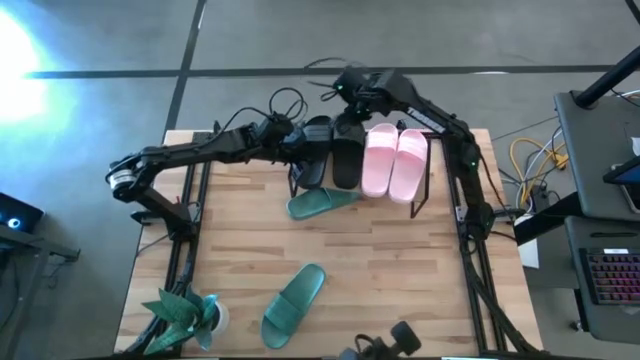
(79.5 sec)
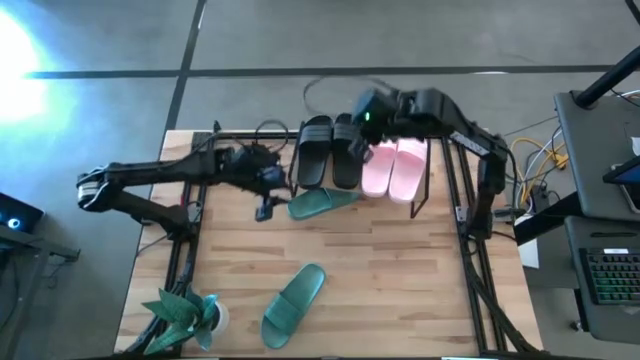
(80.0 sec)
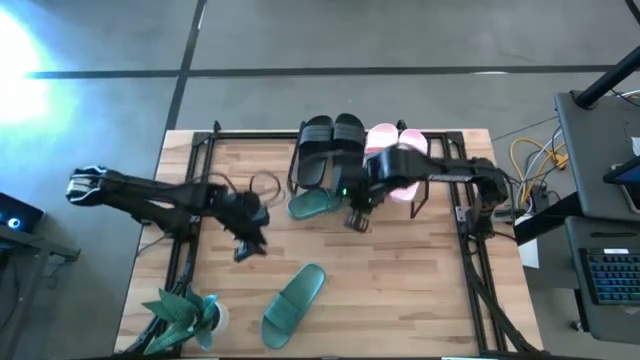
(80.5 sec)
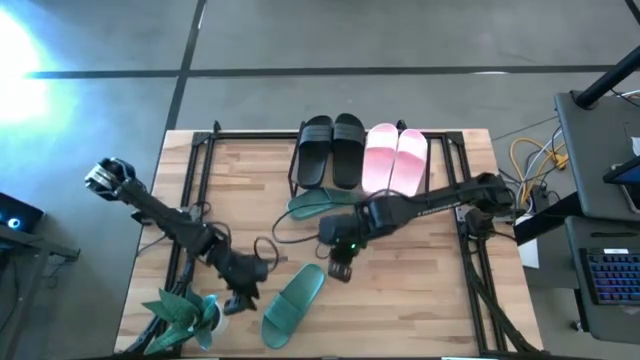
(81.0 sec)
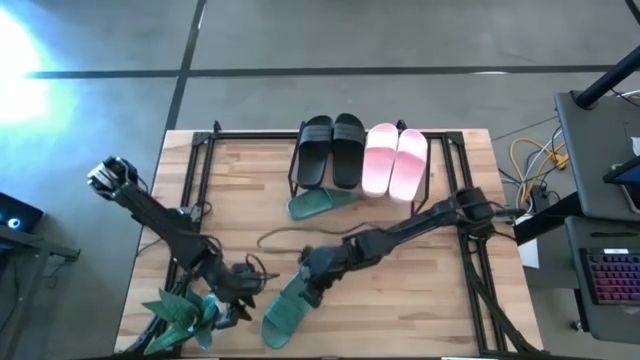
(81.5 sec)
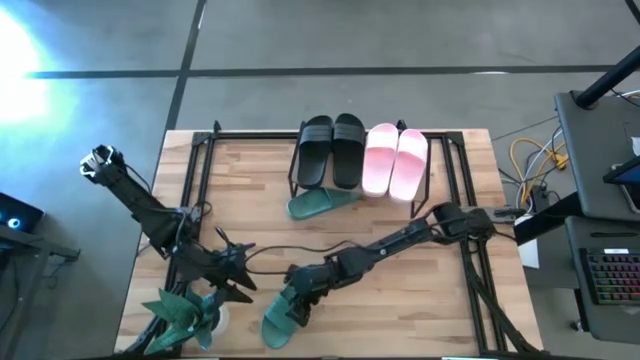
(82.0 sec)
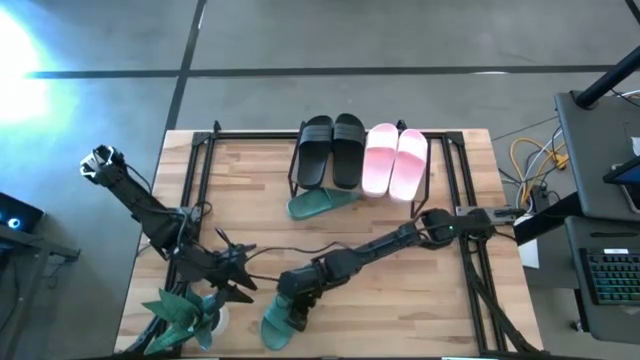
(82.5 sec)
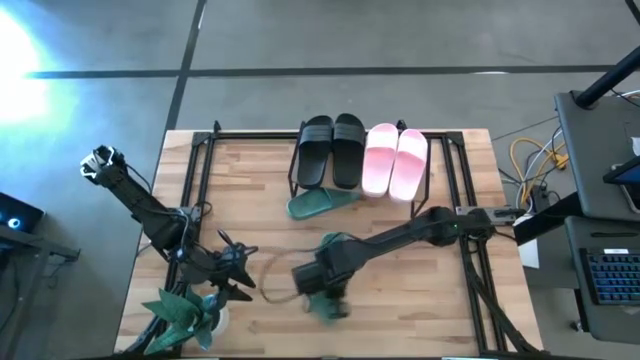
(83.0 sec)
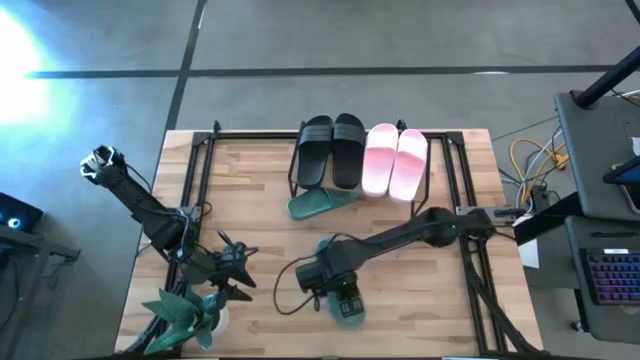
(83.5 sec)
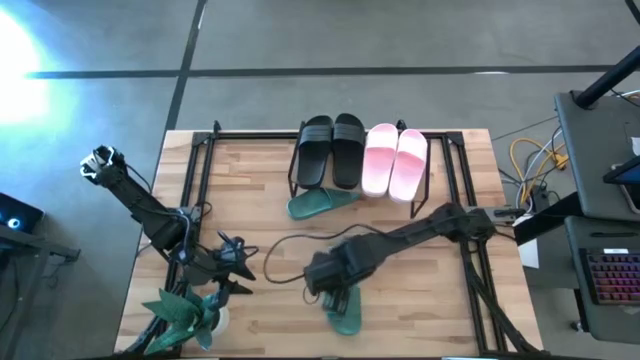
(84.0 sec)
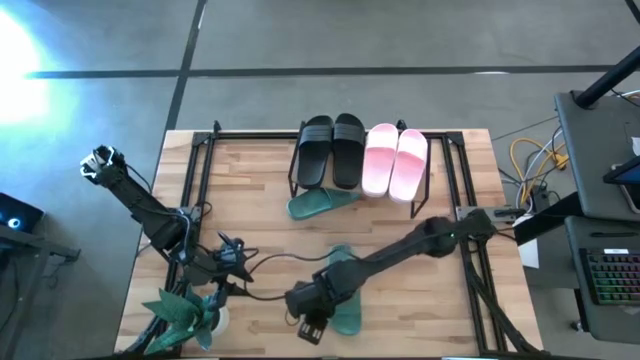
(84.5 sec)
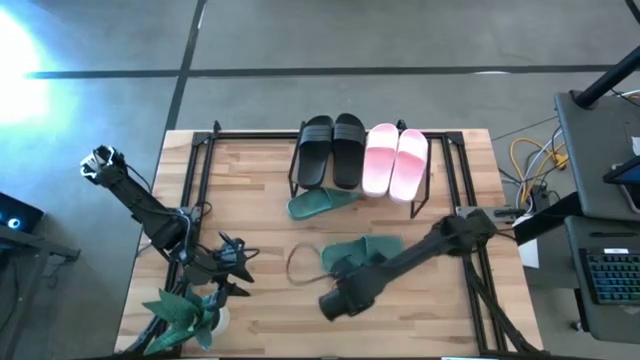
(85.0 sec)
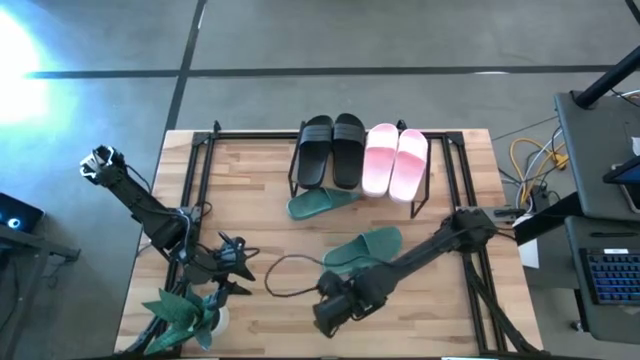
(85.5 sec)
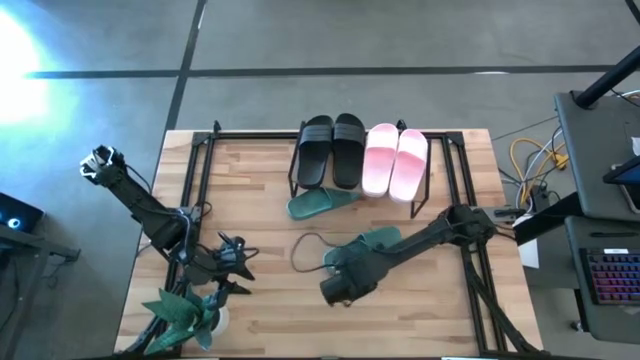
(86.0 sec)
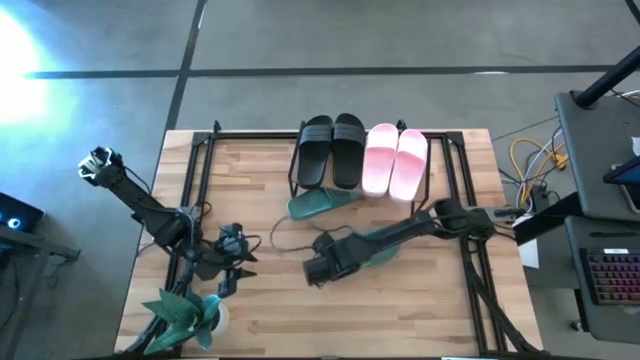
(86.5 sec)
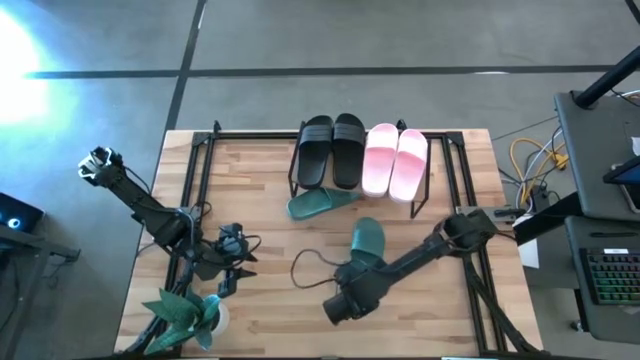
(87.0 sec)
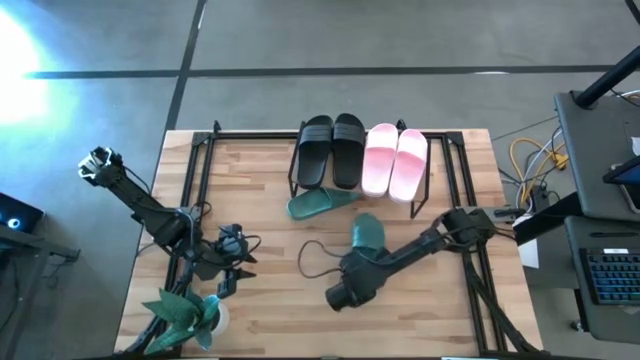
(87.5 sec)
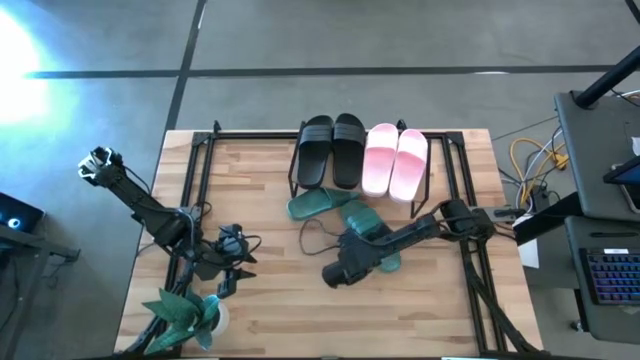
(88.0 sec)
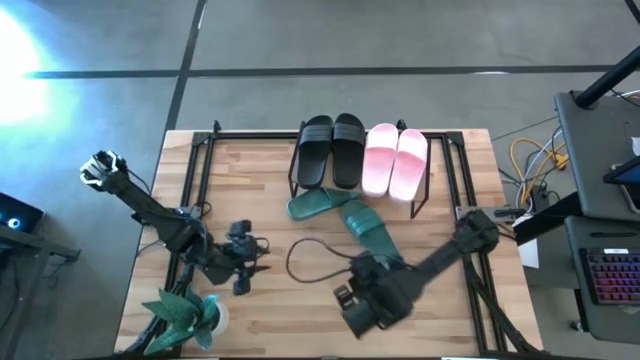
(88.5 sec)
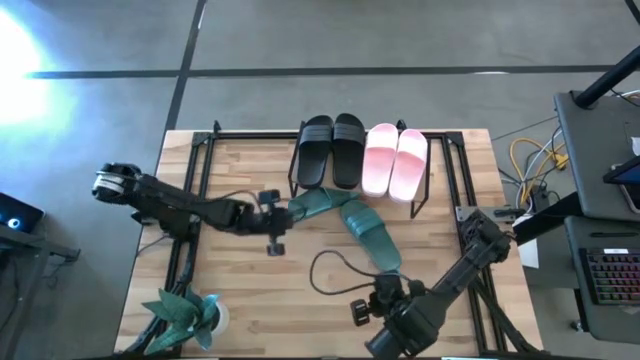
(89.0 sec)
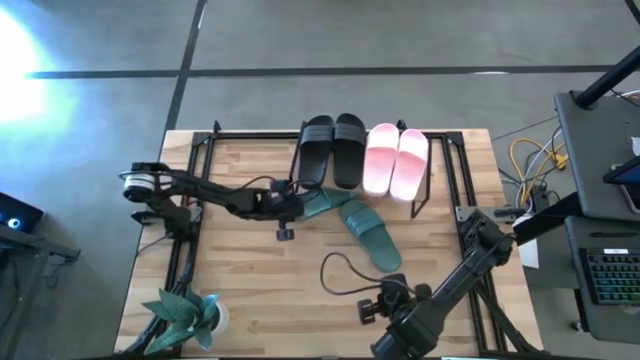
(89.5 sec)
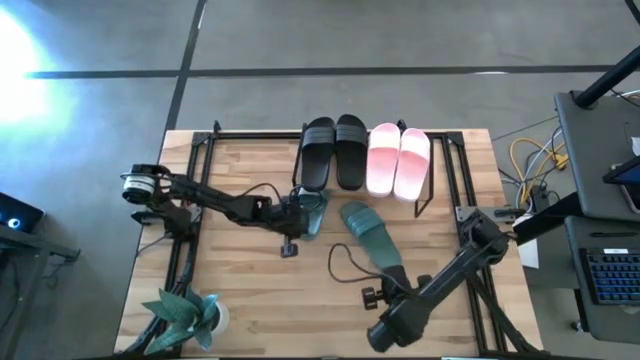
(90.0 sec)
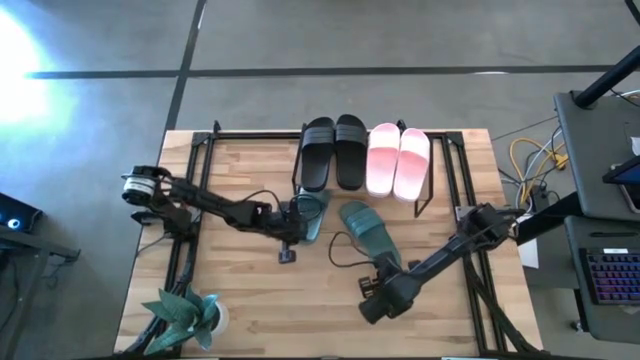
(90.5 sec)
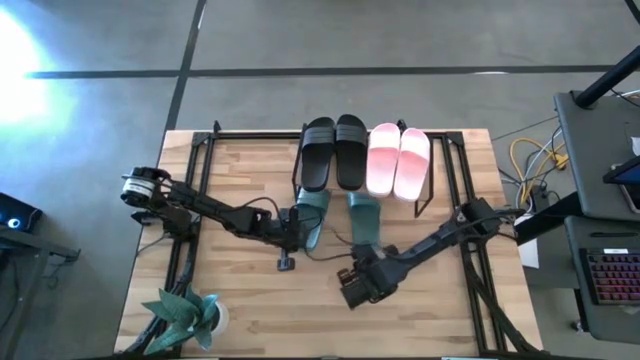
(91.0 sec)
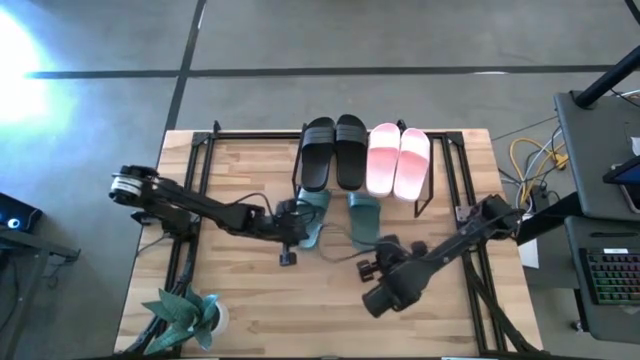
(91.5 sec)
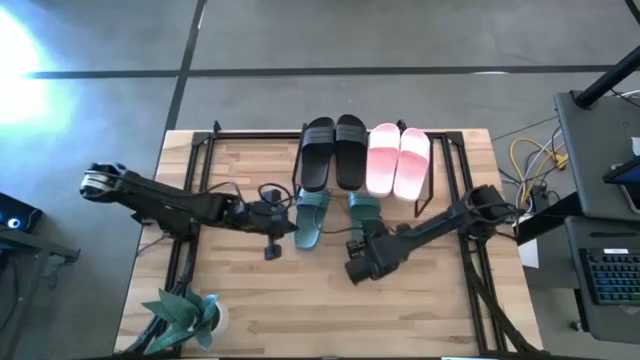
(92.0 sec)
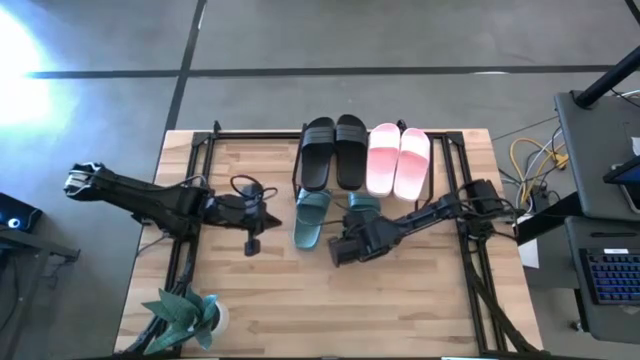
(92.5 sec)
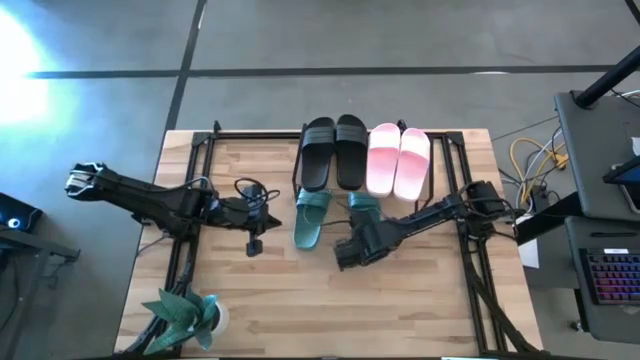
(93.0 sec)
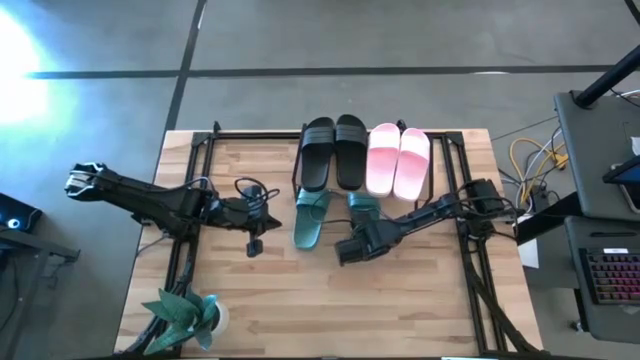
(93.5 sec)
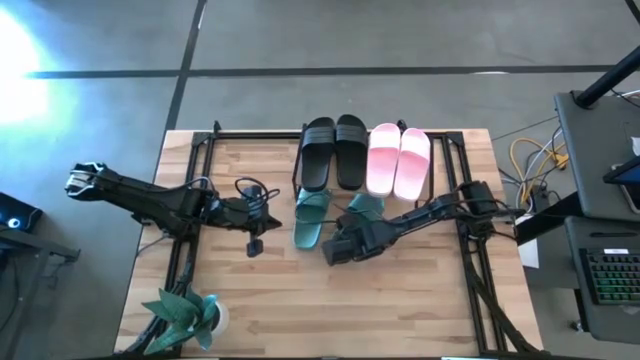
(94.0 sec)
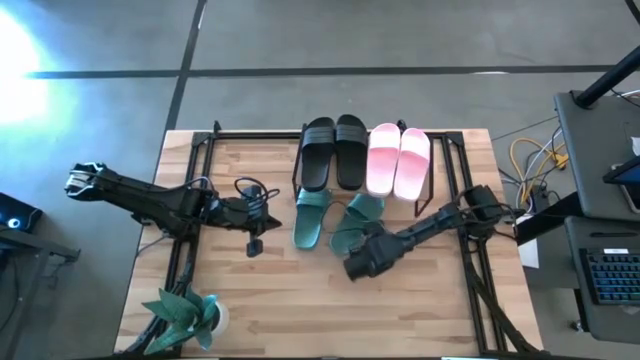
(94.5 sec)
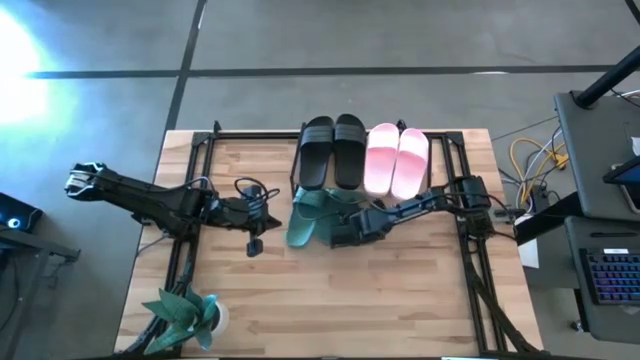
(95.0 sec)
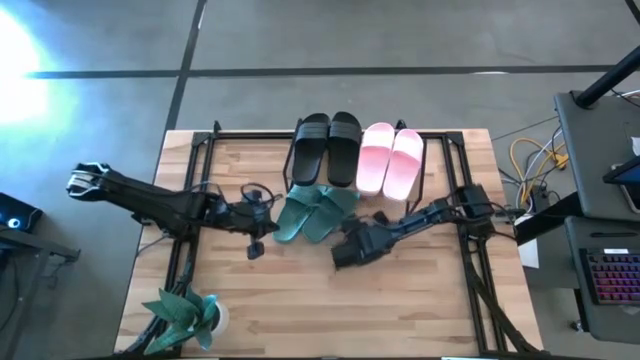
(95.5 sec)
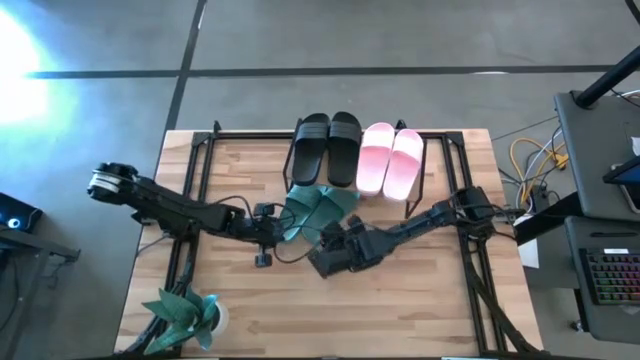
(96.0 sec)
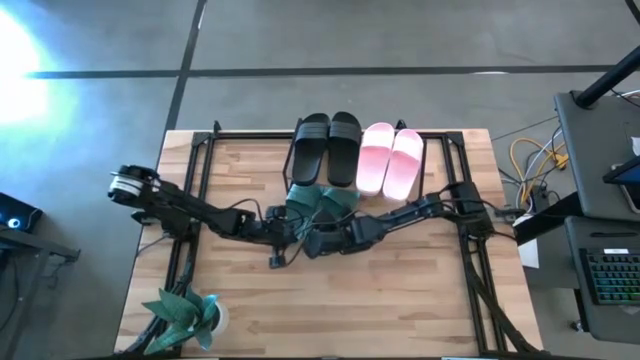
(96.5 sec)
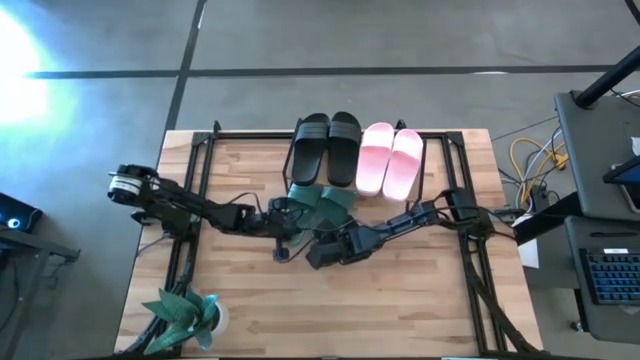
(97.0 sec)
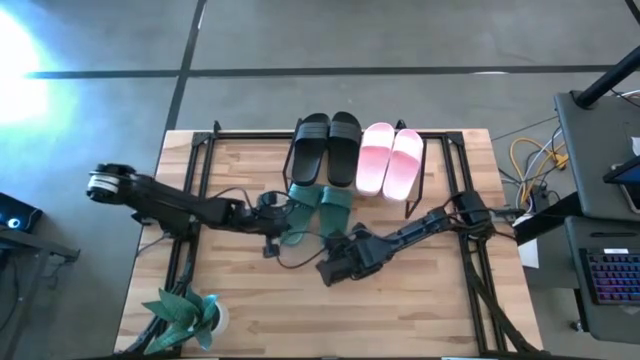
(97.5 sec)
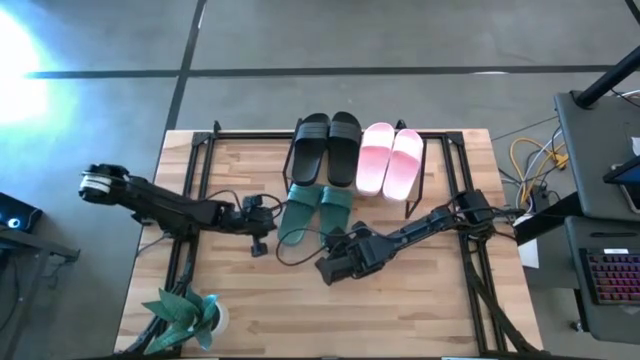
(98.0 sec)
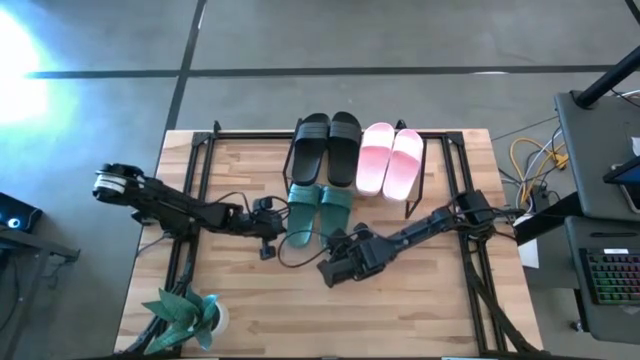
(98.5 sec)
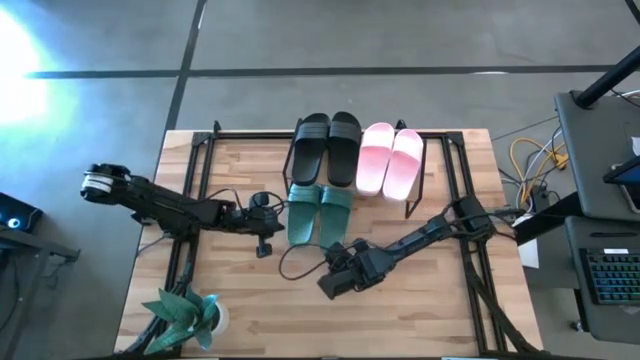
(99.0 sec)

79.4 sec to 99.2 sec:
Task: Pick and place slides into the shelf
Put the green slipper under the shelf

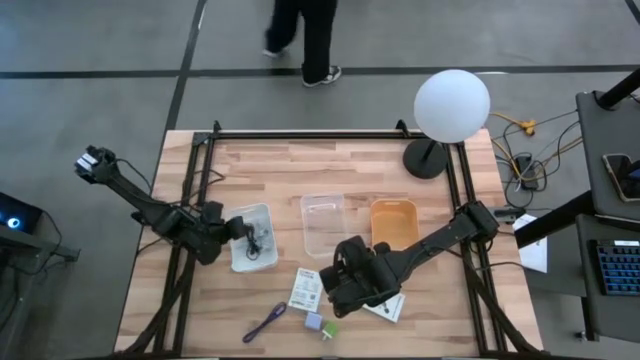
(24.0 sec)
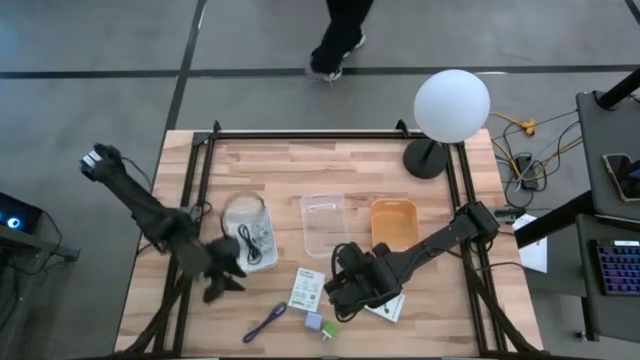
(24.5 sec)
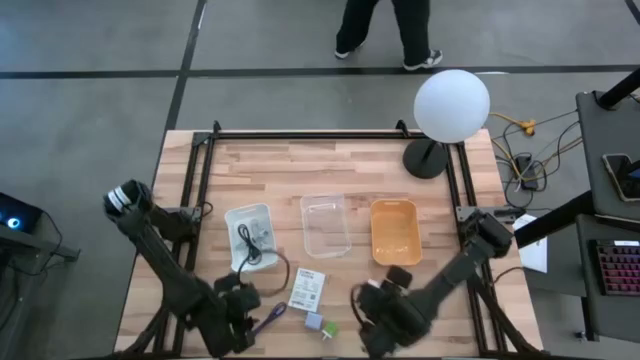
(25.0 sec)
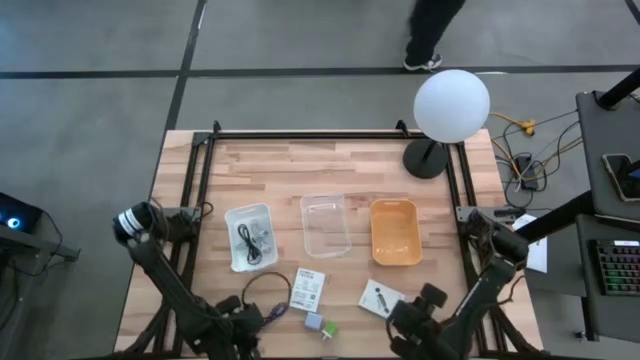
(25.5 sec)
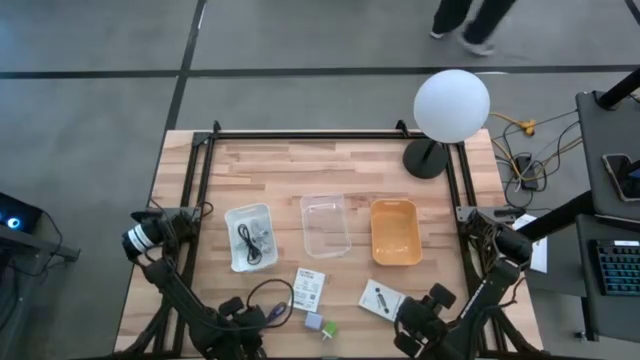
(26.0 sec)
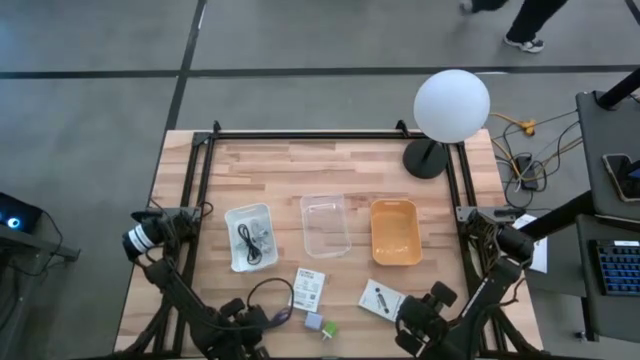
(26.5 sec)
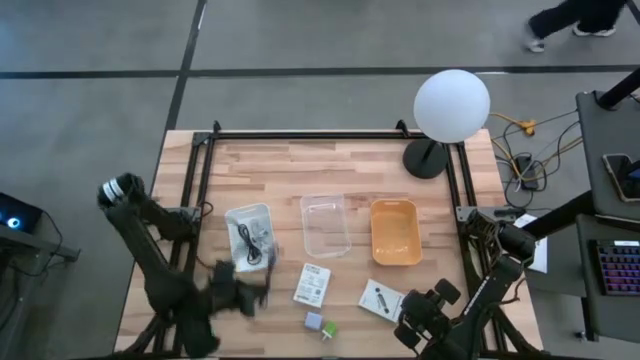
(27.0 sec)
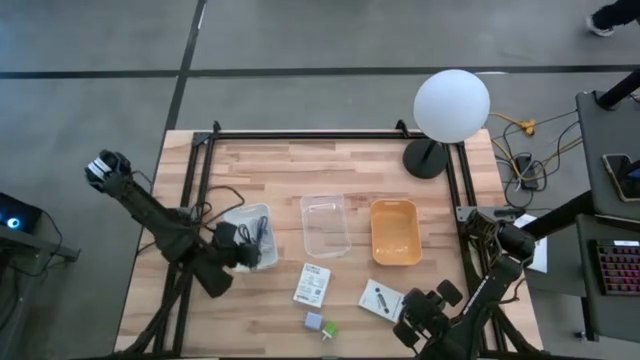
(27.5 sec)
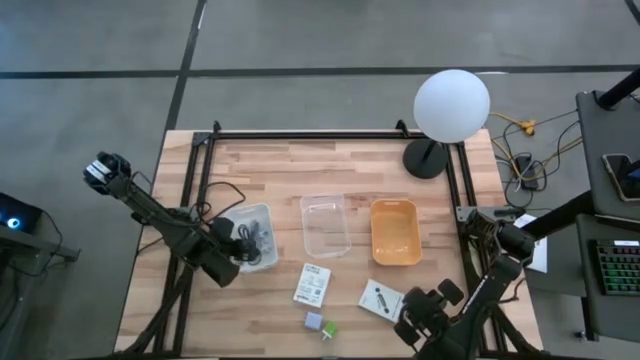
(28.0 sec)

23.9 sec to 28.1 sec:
Task: Pick and place items into bin
Put the blue charger cable into the white bin
